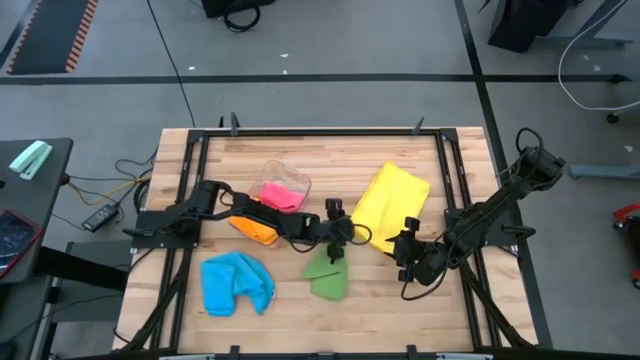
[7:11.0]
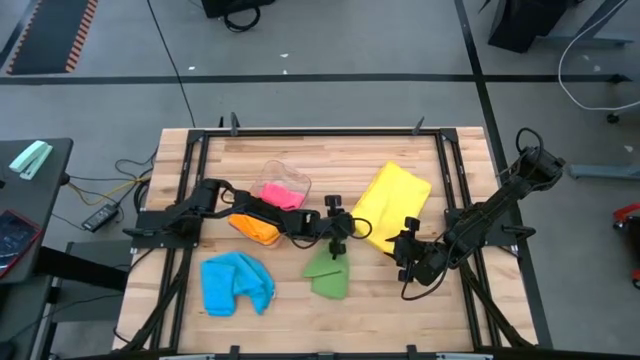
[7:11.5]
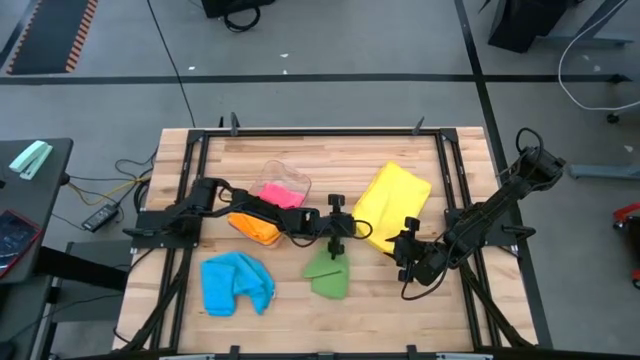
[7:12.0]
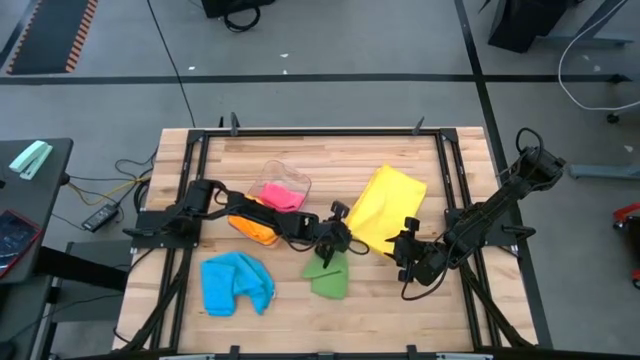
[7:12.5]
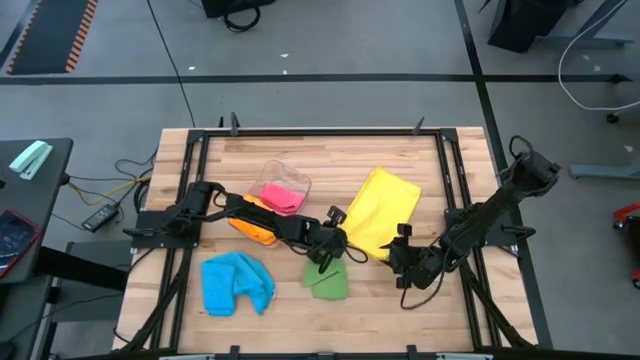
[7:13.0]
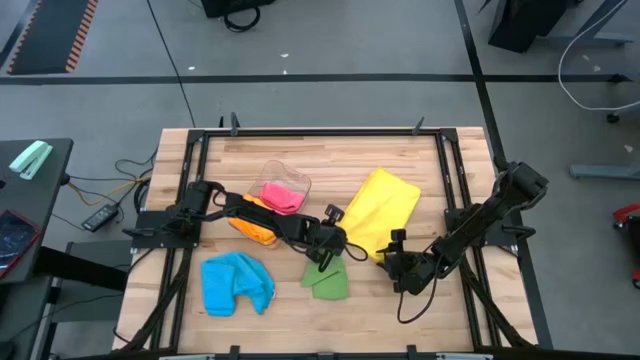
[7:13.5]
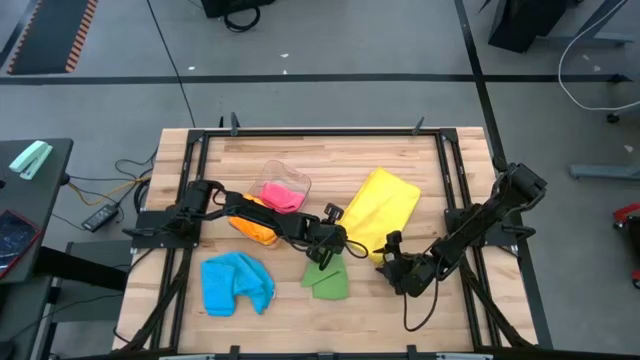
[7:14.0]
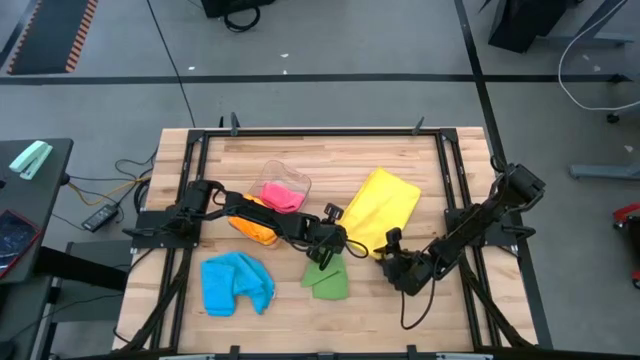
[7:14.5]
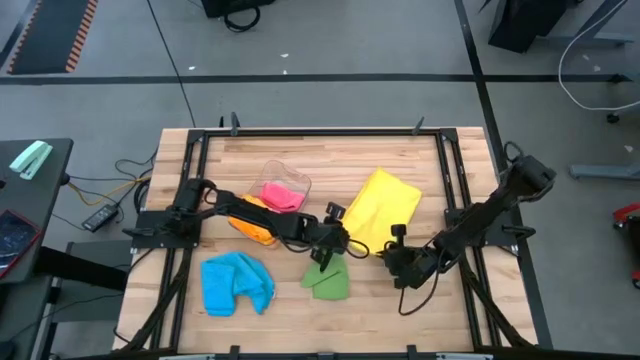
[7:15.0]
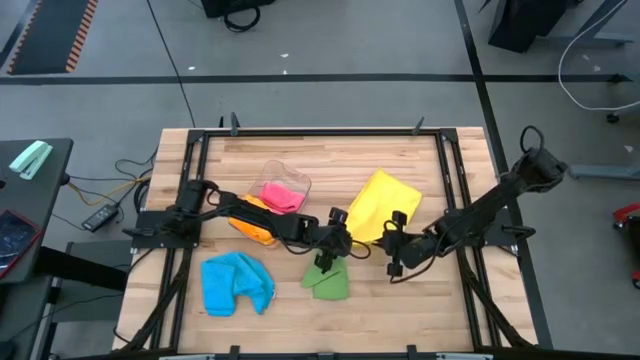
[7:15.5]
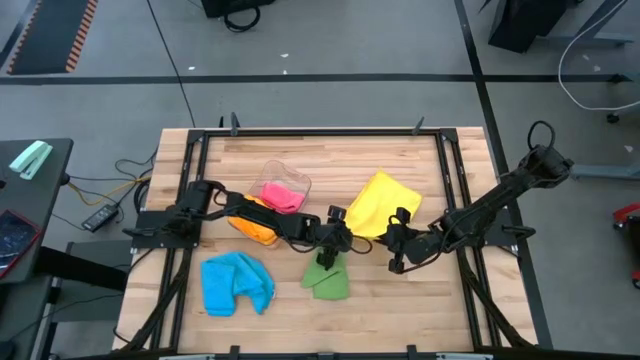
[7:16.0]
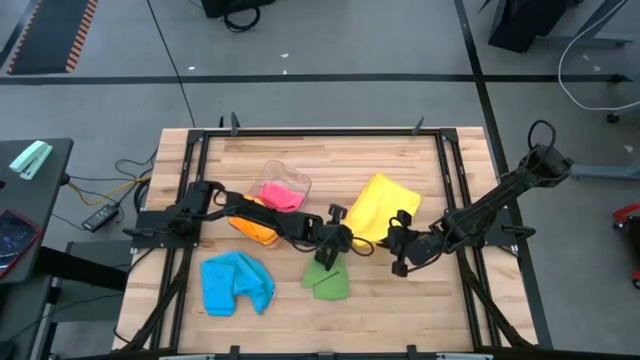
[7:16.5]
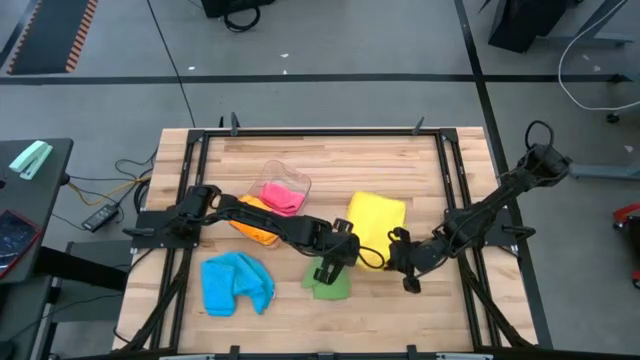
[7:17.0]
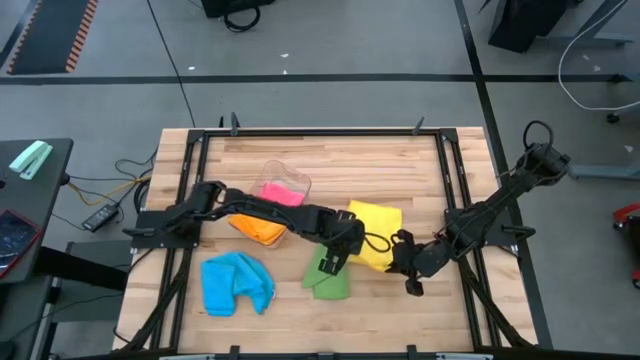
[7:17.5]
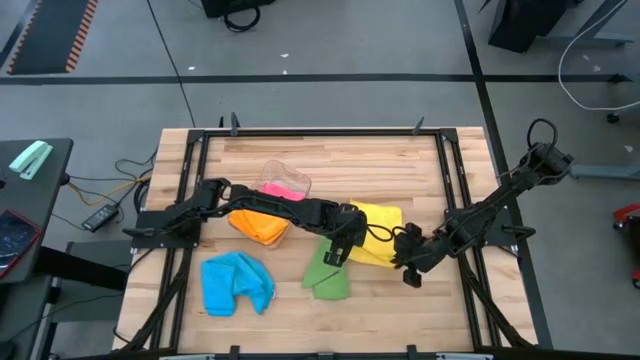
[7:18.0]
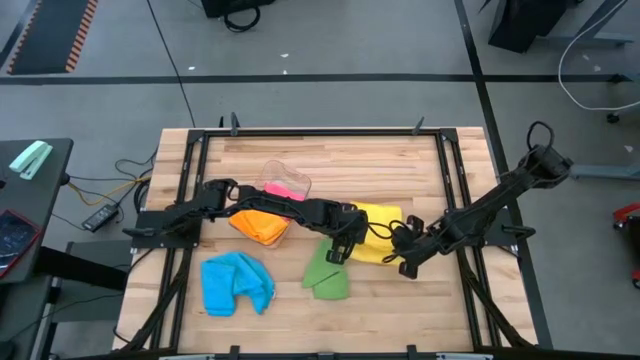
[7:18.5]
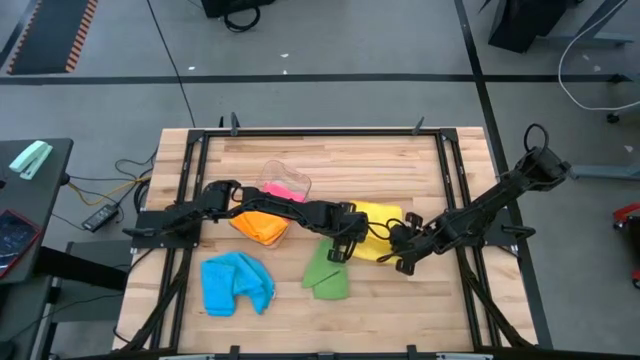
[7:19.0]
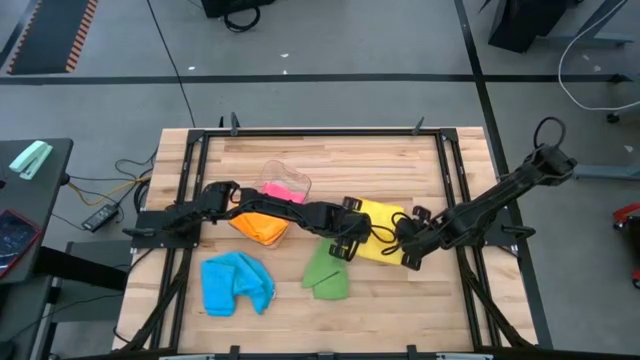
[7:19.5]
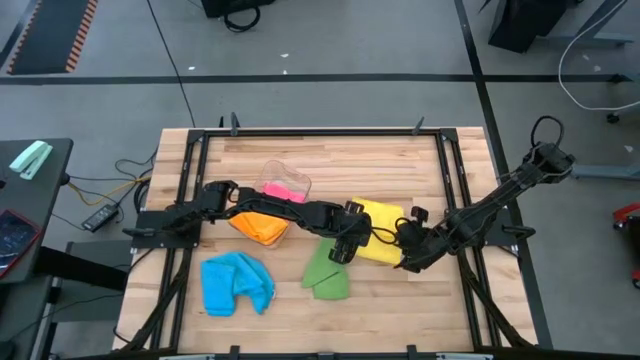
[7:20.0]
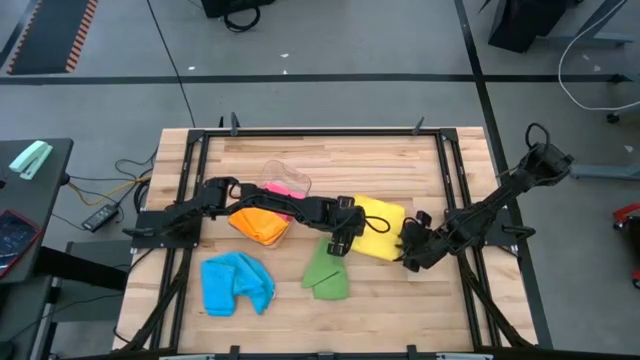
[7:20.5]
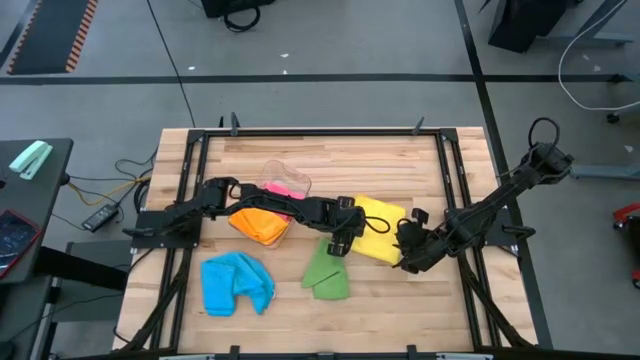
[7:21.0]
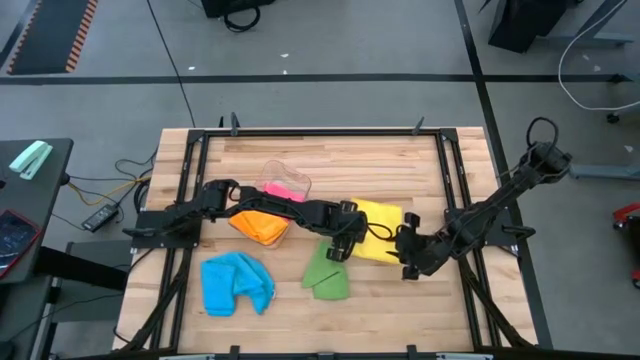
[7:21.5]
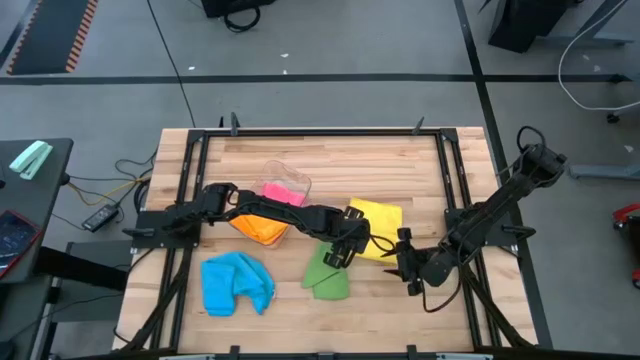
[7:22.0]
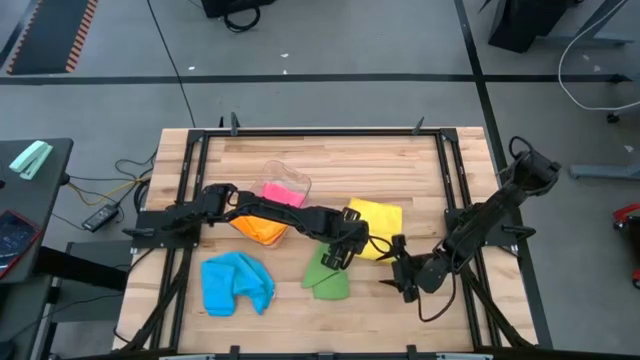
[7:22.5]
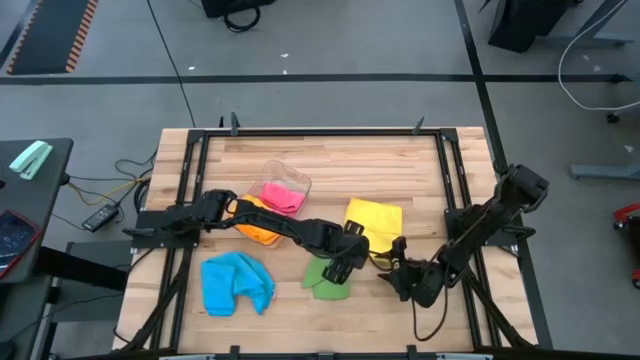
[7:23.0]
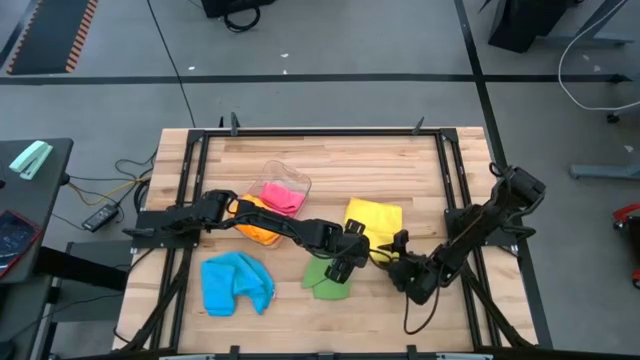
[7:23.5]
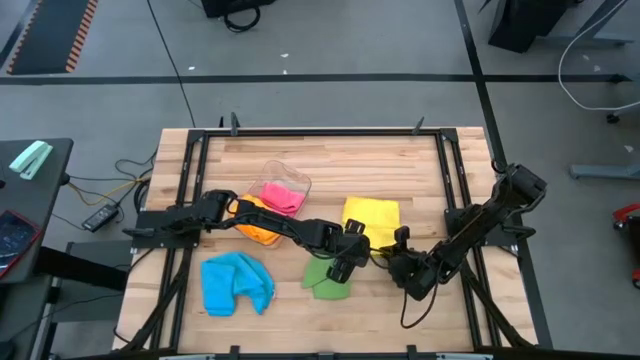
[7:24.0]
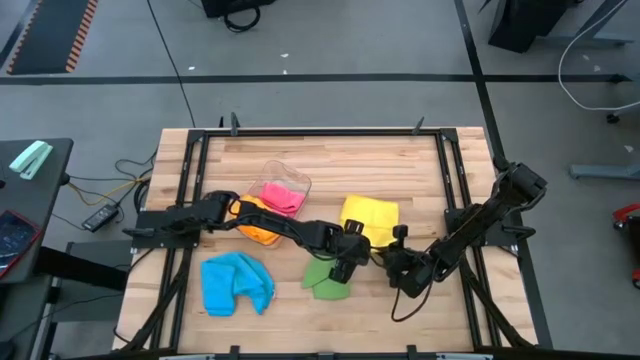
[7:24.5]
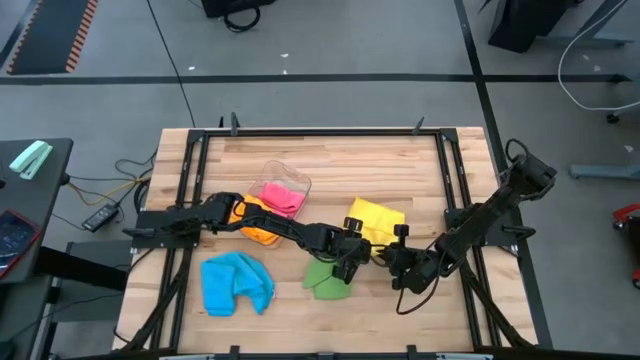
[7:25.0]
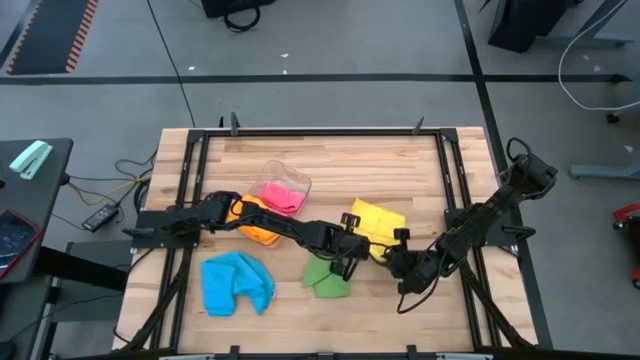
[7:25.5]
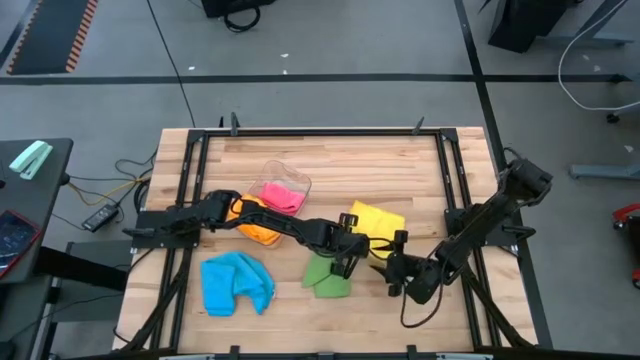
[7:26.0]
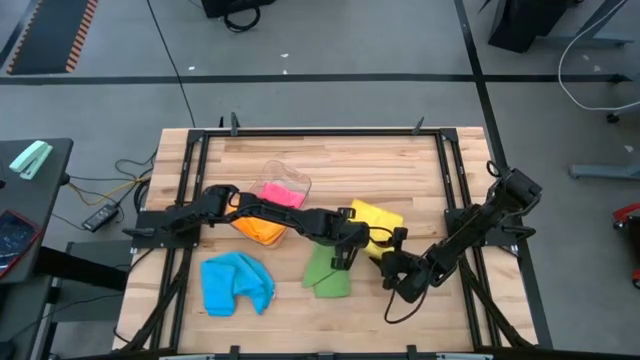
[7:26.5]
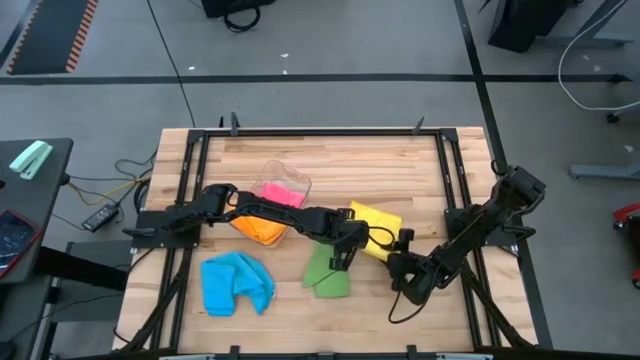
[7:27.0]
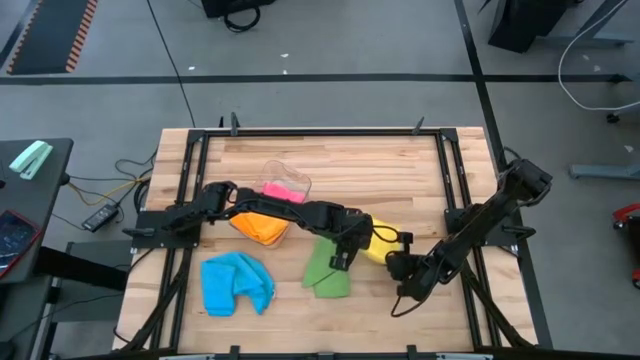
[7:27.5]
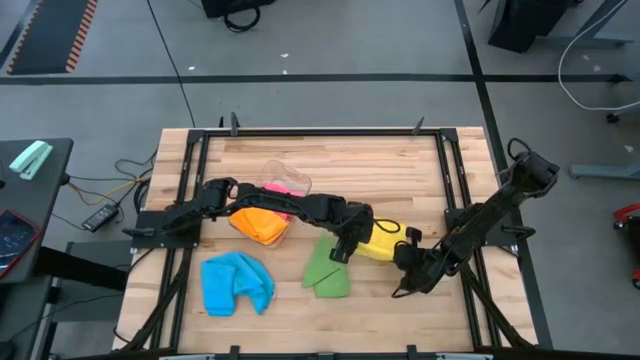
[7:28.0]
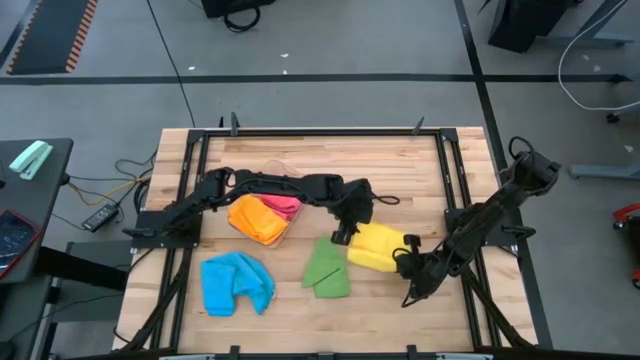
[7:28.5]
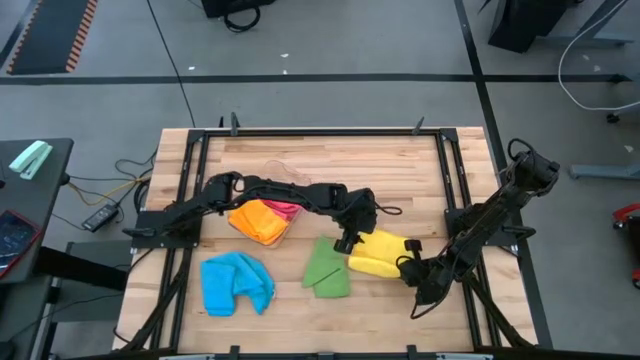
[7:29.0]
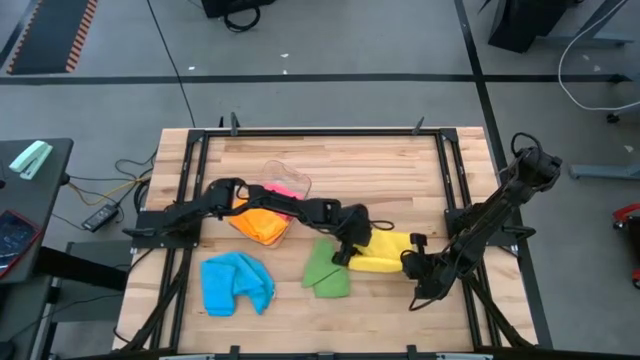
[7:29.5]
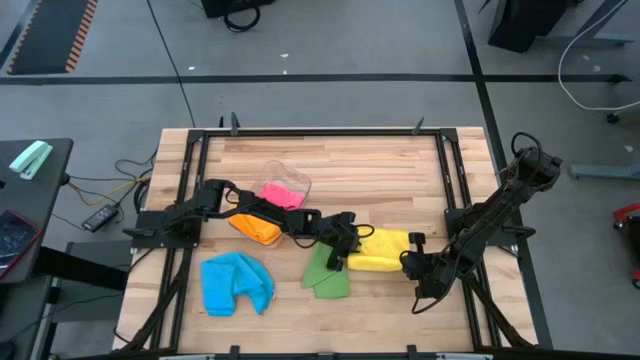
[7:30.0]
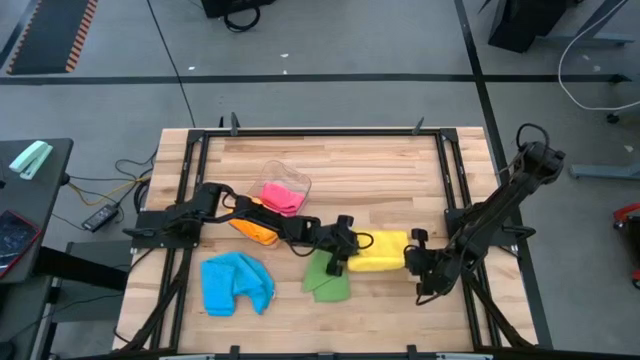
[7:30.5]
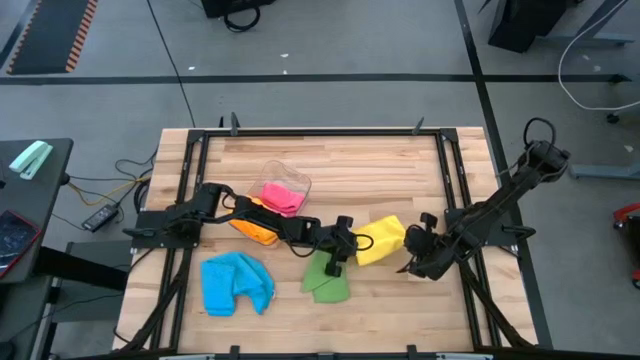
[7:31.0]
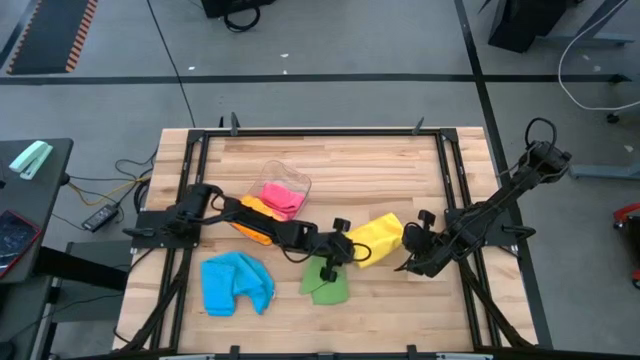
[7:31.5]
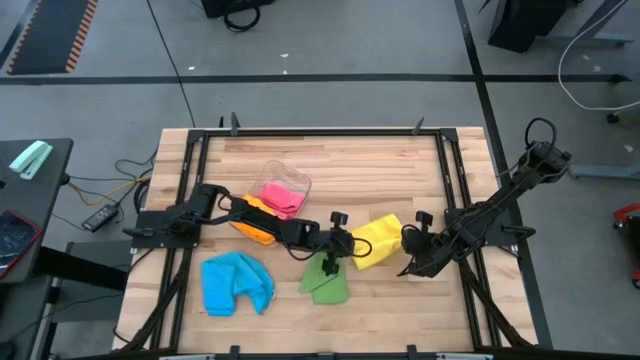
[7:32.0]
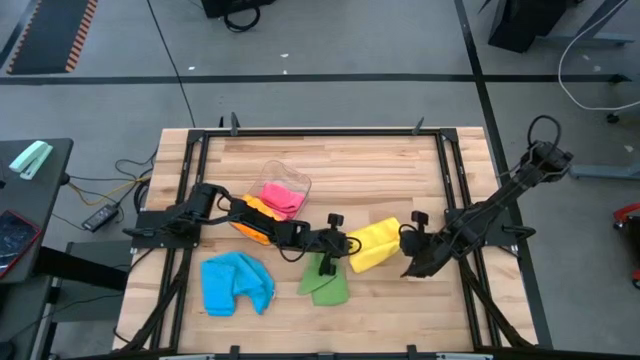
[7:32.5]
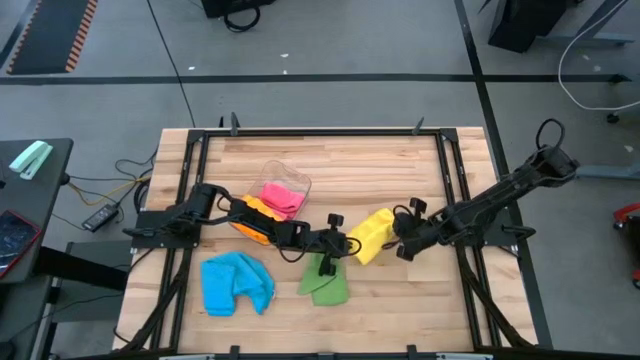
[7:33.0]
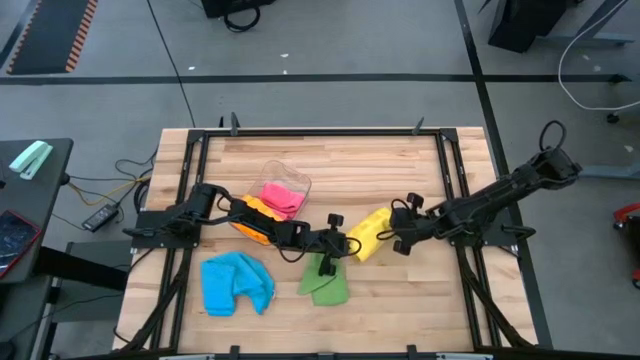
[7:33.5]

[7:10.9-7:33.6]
Task: Fold microfiber towels
Fold the yellow microfiber towel
